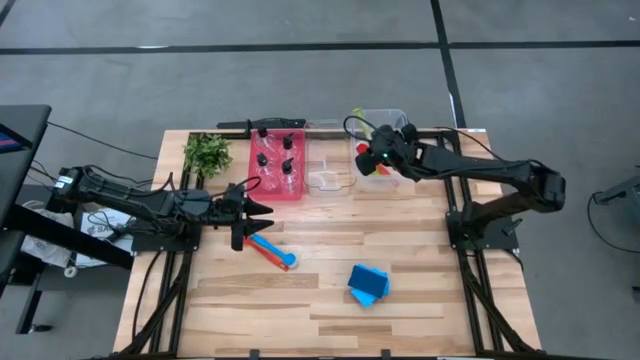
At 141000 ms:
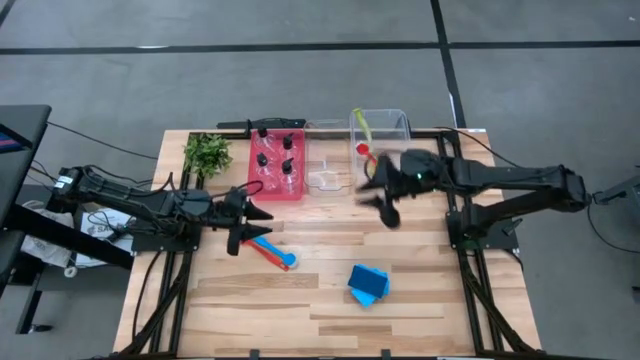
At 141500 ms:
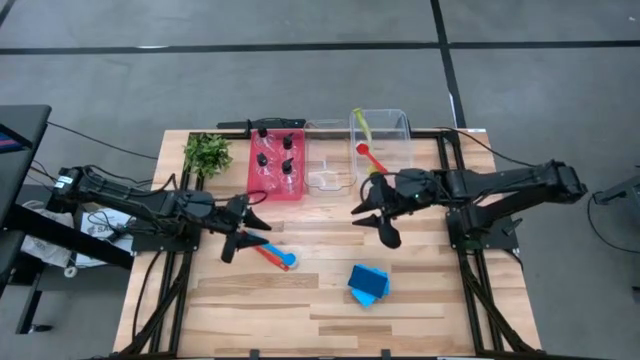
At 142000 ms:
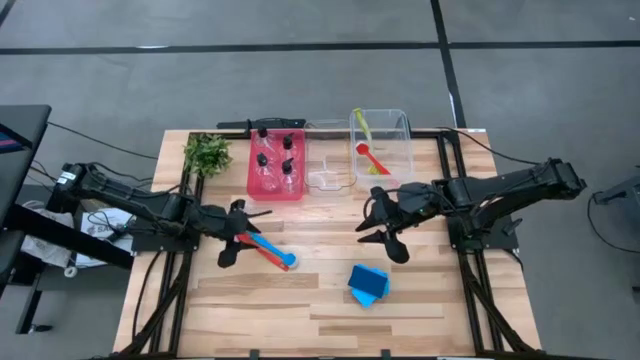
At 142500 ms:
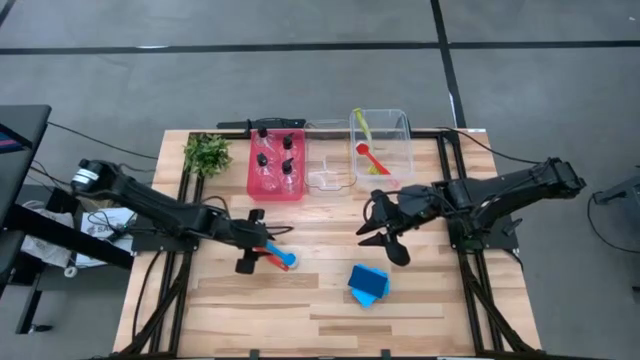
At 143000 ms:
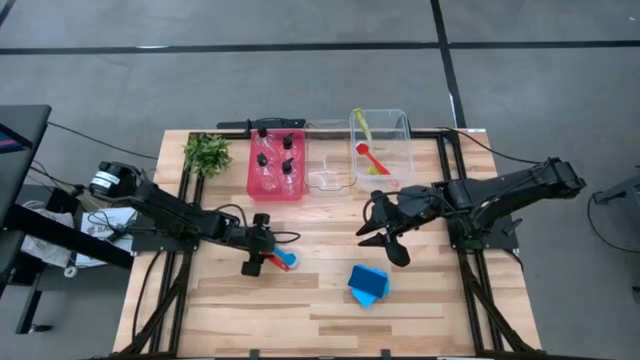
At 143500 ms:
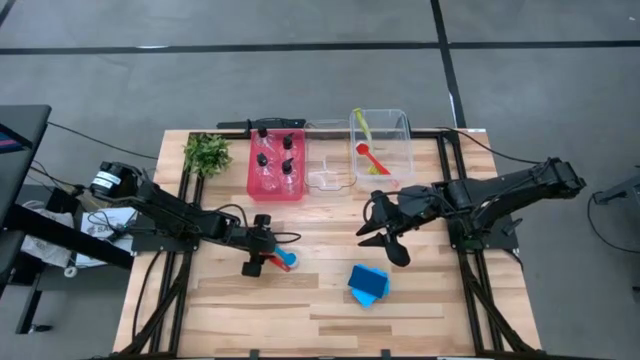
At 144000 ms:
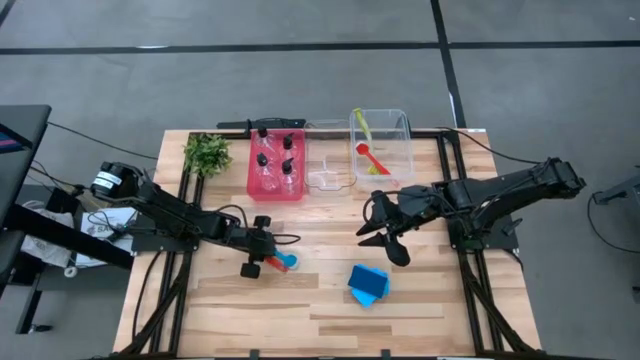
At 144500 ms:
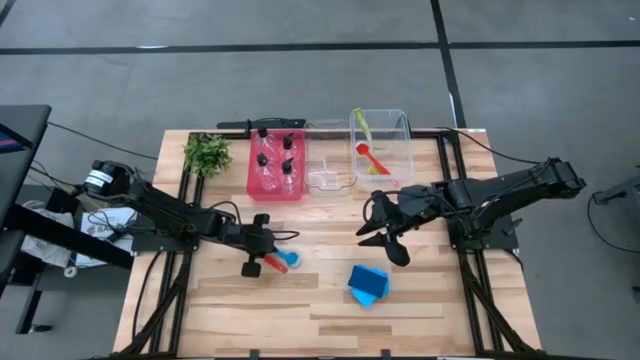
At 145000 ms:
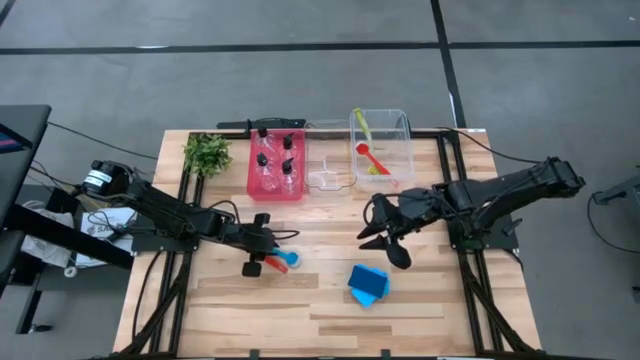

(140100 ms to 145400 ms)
Task: Pick & Place Kitchen Sink Supplies
Put the blue scrubbing brush into the white bin

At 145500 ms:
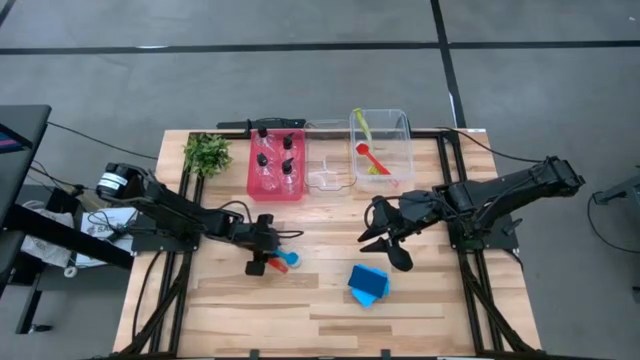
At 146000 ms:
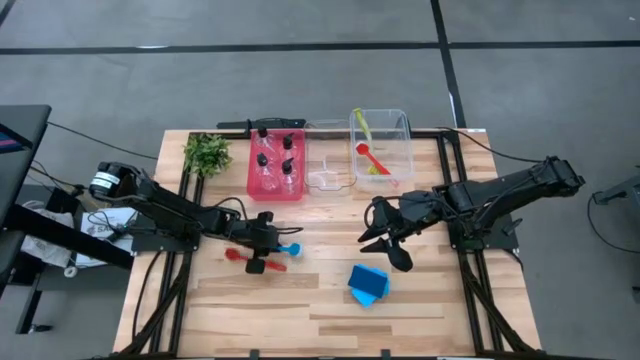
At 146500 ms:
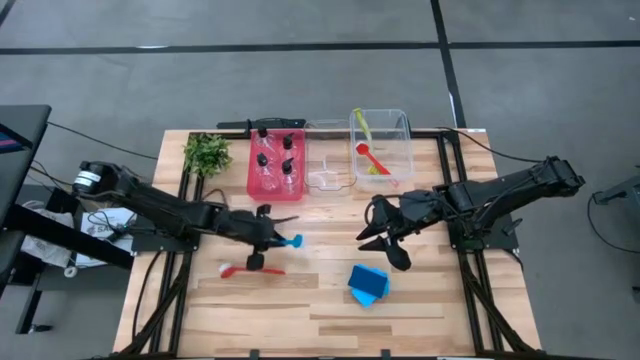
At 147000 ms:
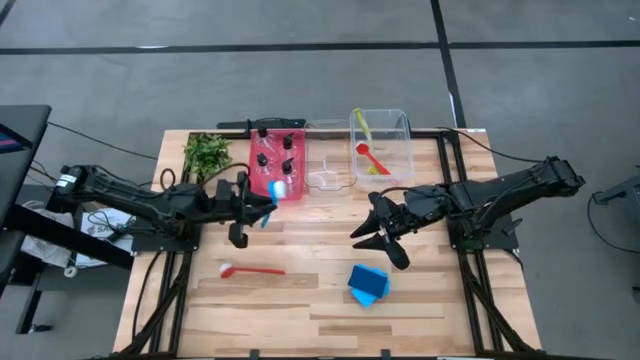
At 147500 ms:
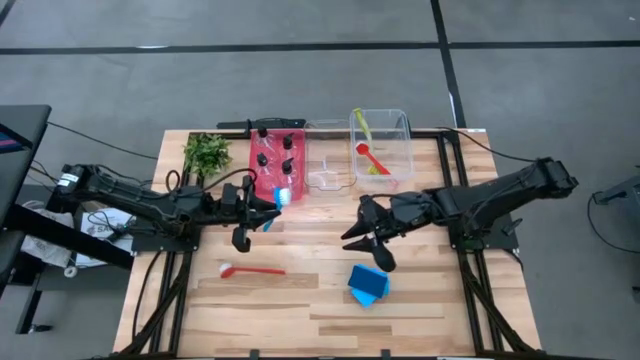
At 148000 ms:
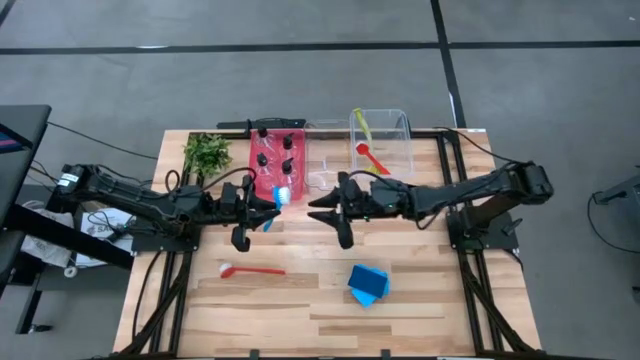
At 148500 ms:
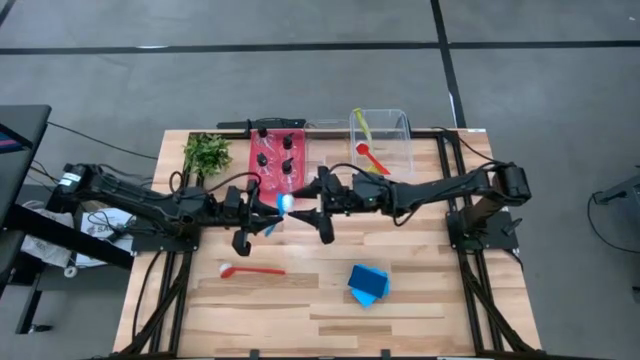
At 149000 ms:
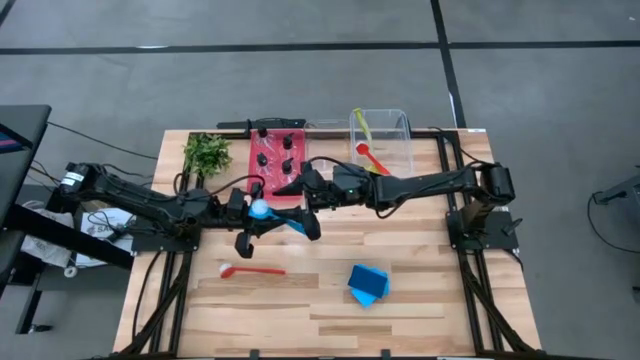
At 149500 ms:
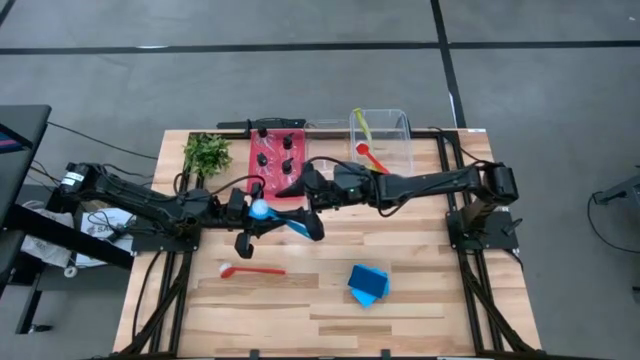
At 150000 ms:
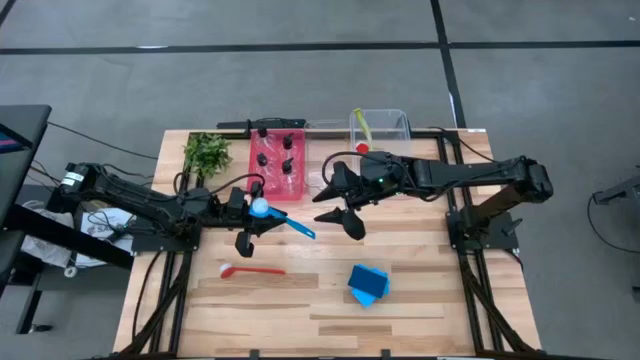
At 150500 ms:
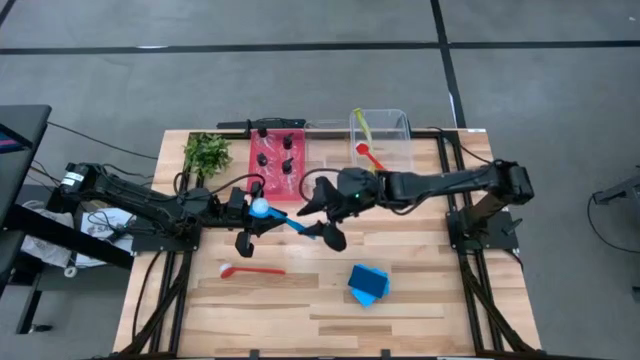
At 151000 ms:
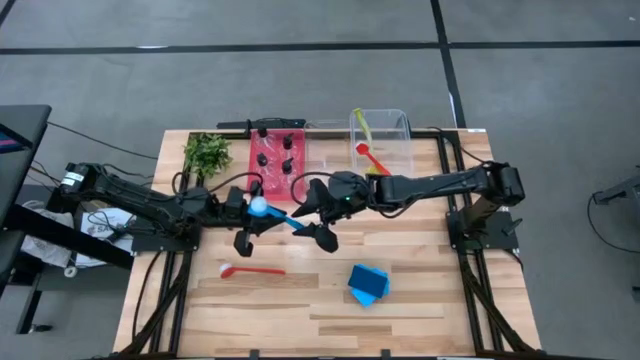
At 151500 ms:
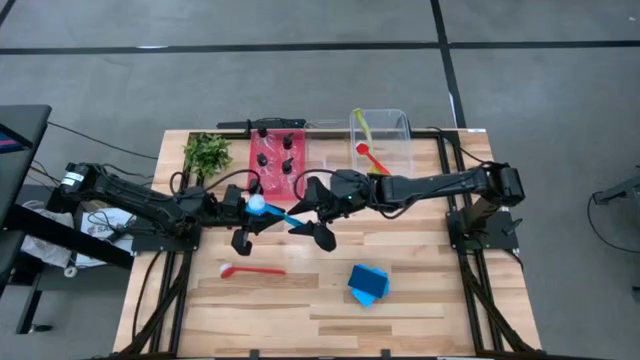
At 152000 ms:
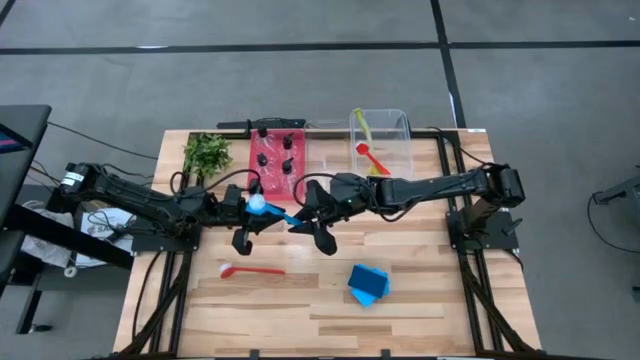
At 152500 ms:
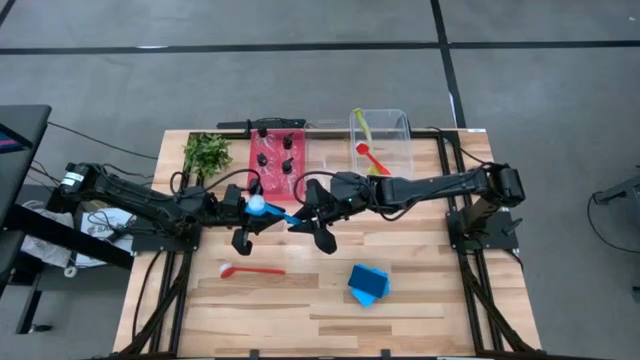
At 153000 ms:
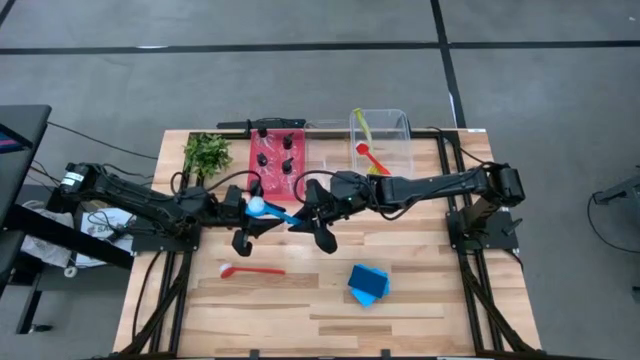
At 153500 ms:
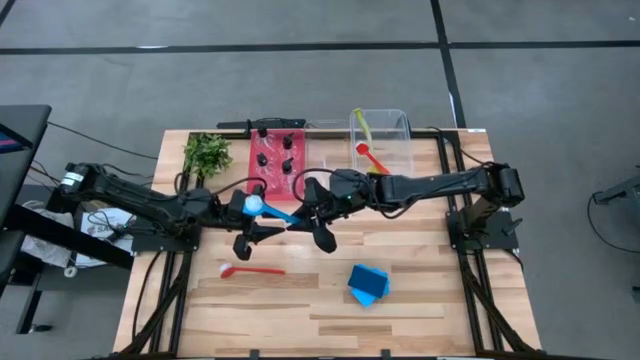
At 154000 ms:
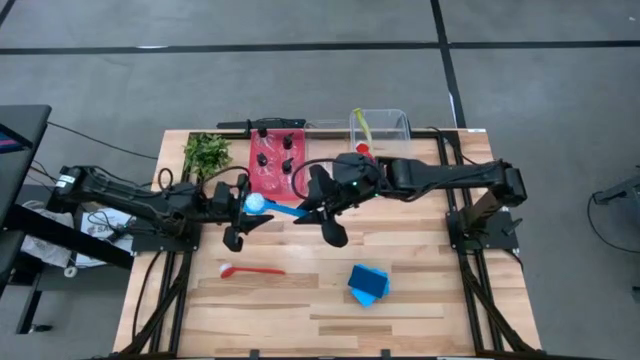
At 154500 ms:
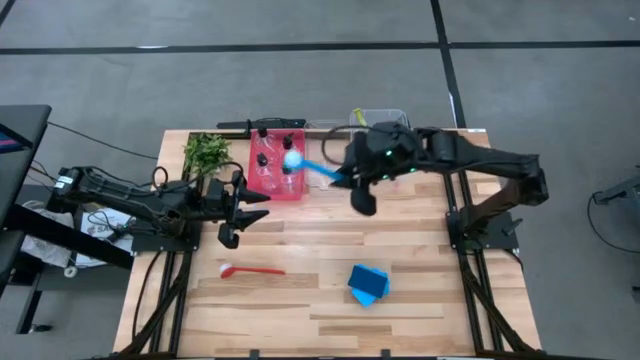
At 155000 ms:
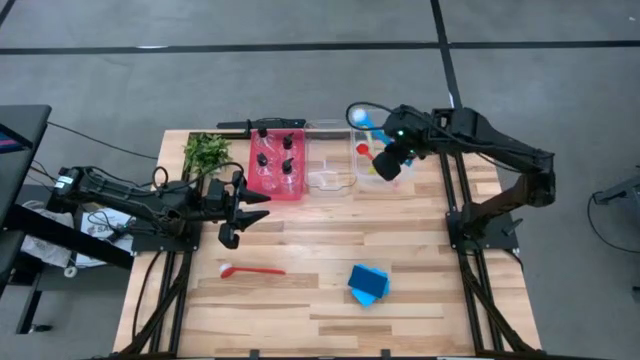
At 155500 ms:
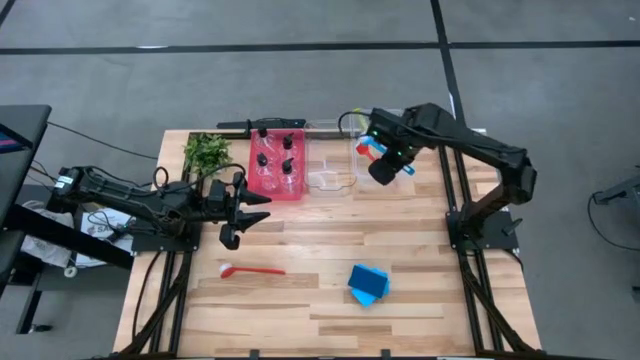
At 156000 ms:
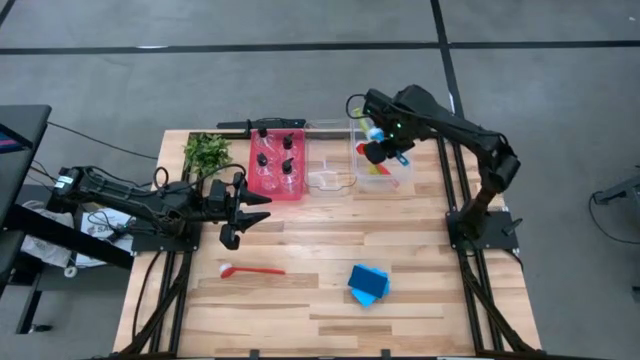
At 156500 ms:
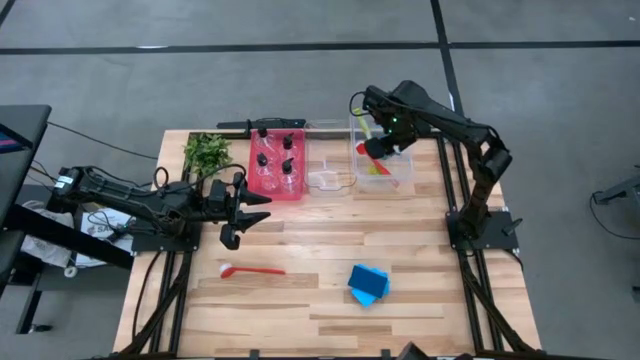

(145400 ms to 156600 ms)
Put the blue scrubbing brush into the white bin

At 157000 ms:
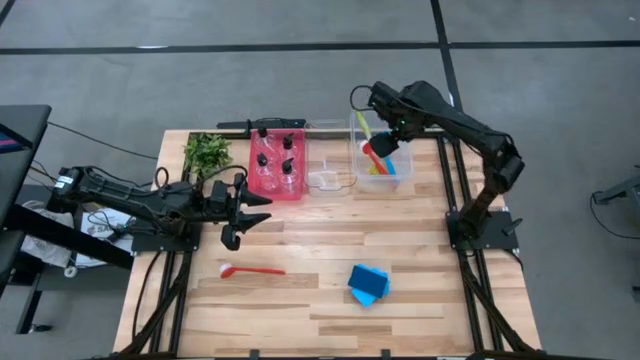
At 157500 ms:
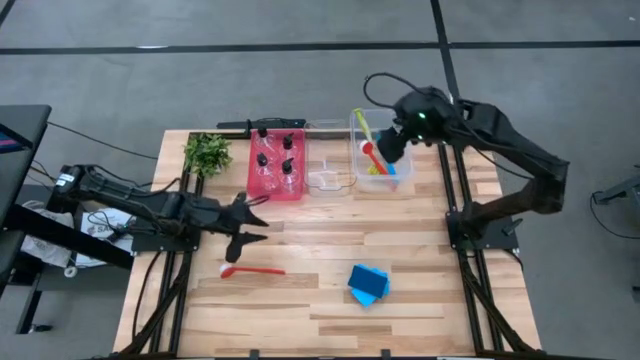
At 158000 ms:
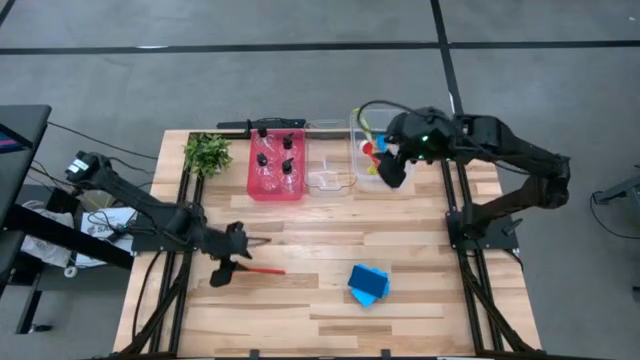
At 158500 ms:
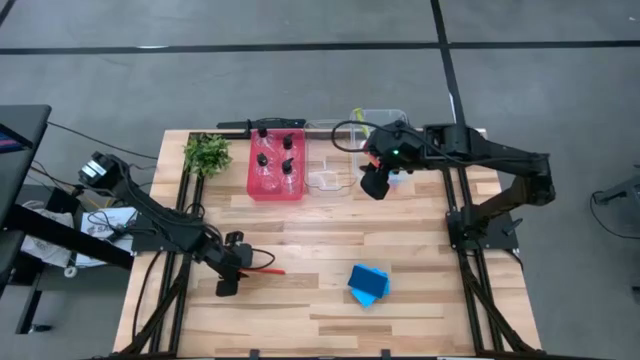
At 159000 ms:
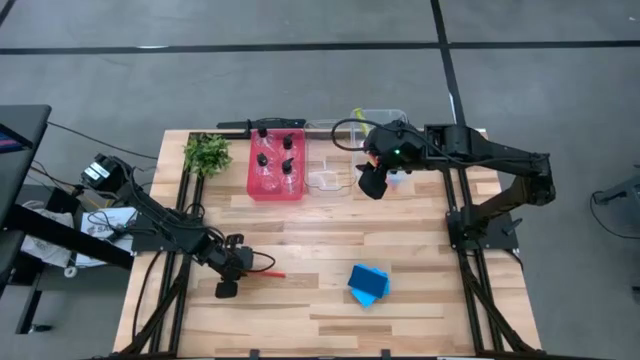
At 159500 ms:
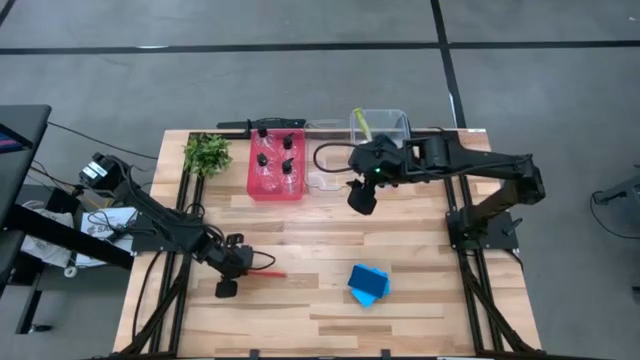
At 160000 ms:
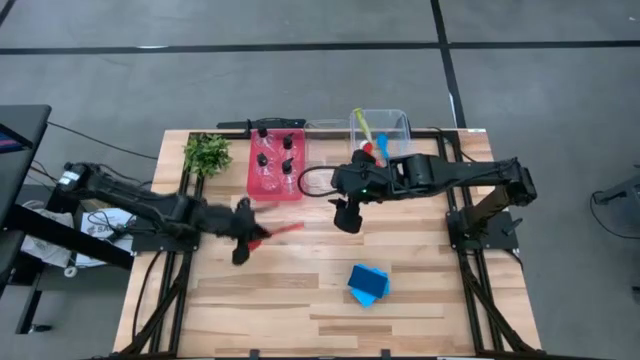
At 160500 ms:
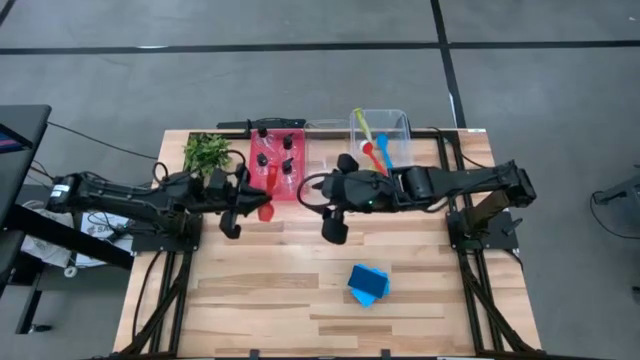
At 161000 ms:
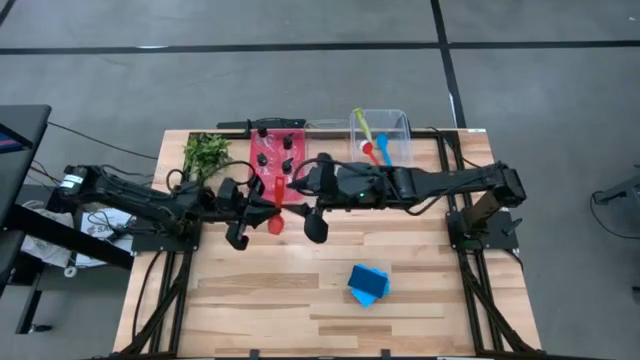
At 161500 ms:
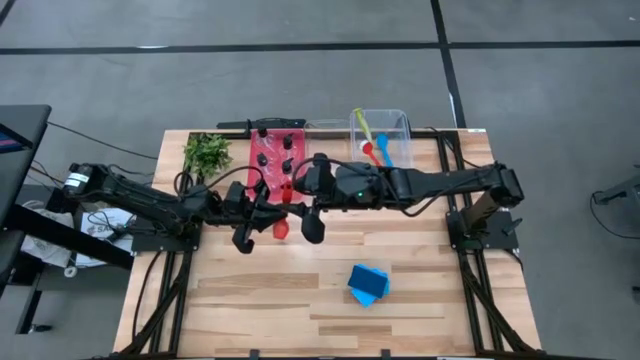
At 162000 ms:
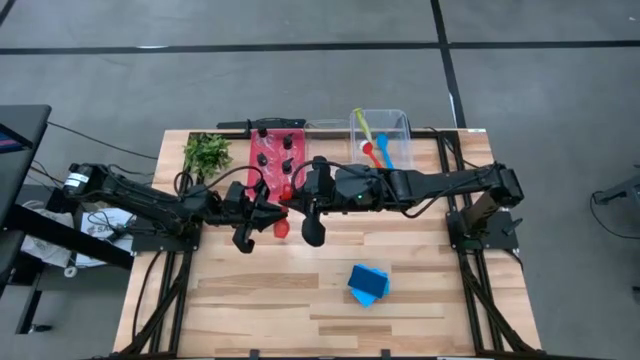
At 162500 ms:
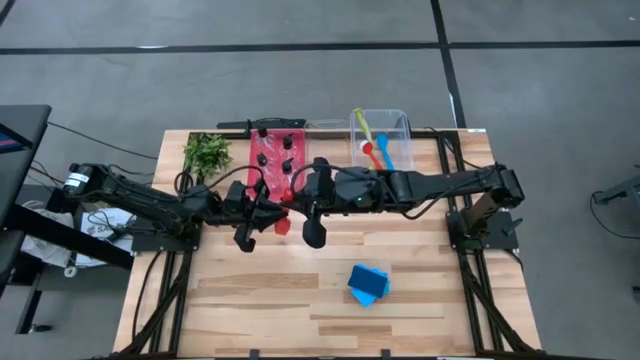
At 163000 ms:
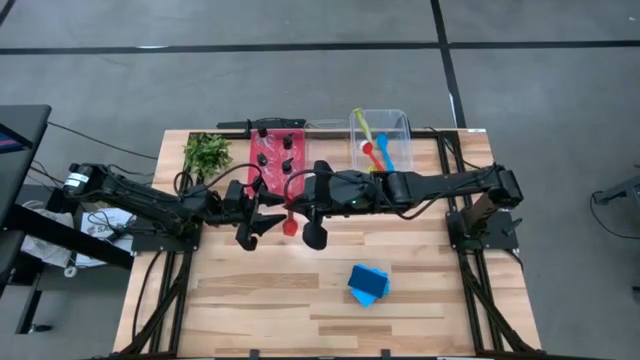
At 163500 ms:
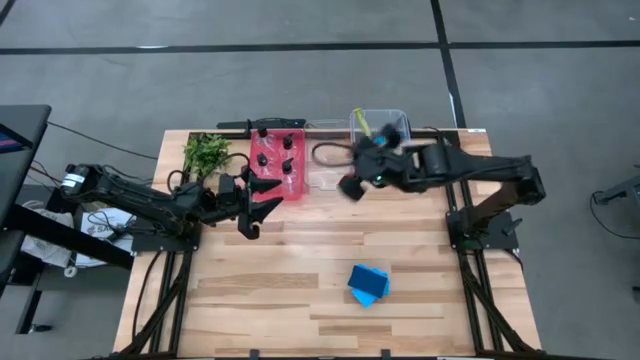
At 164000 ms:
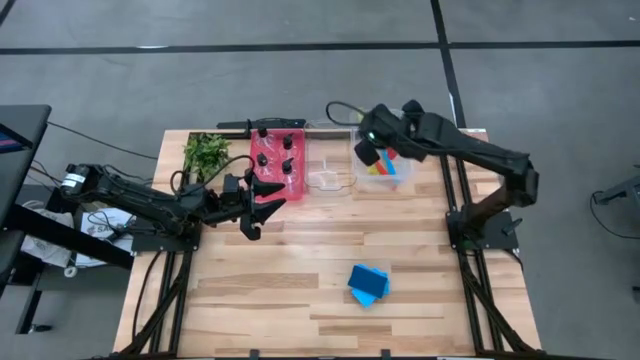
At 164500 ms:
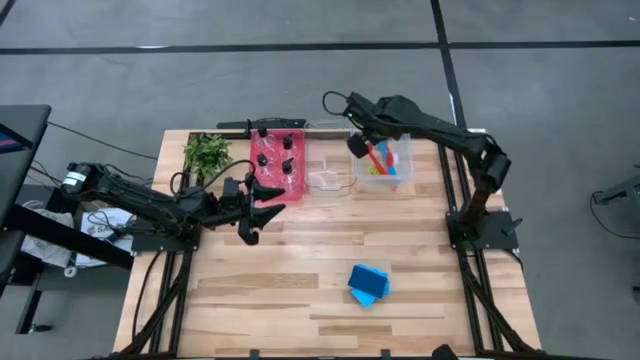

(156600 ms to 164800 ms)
Put the red scrubbing brush into the white bin
